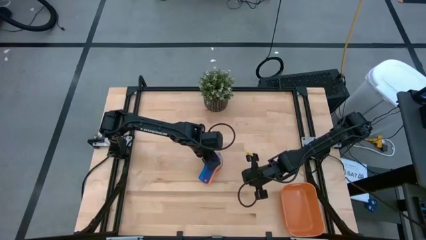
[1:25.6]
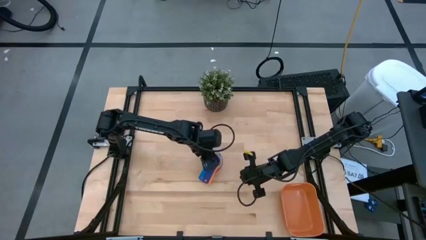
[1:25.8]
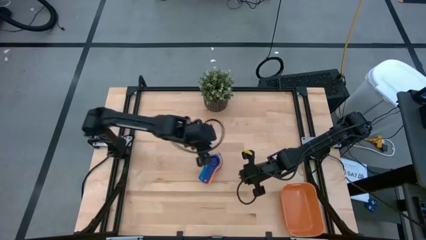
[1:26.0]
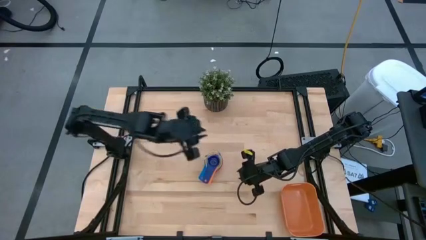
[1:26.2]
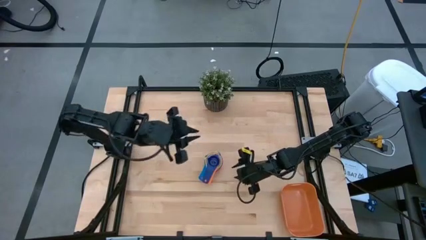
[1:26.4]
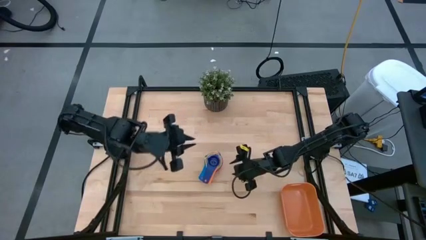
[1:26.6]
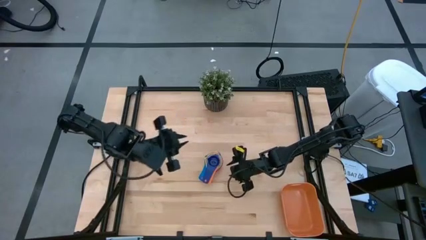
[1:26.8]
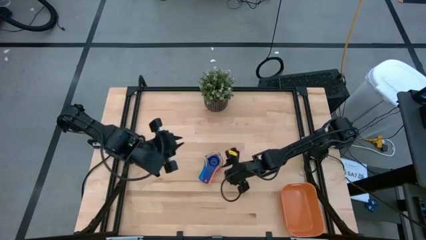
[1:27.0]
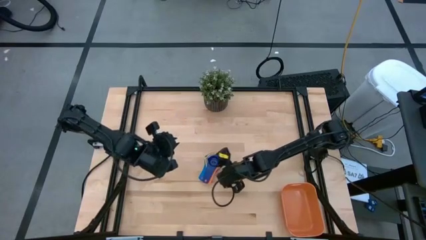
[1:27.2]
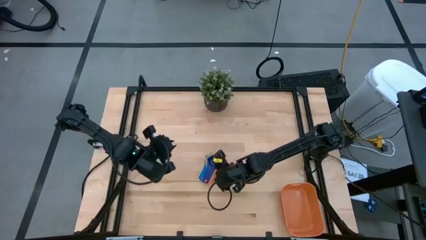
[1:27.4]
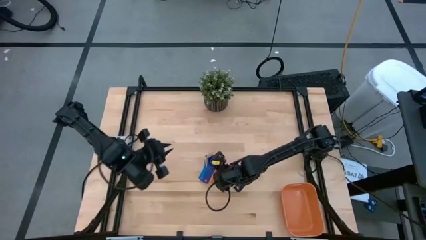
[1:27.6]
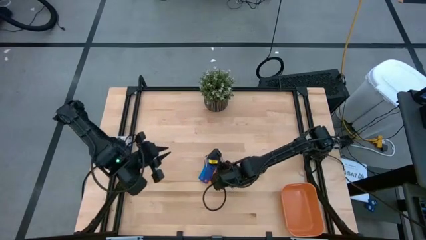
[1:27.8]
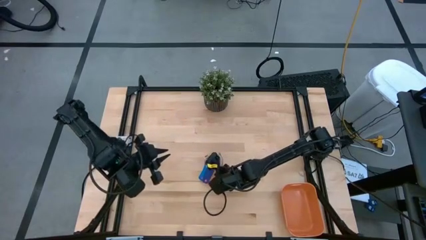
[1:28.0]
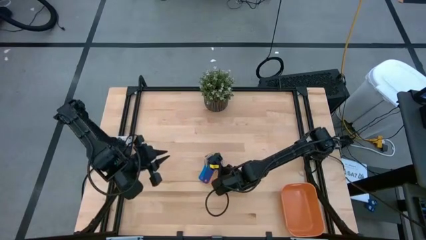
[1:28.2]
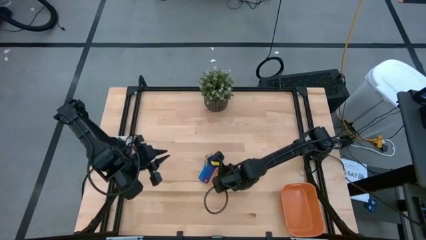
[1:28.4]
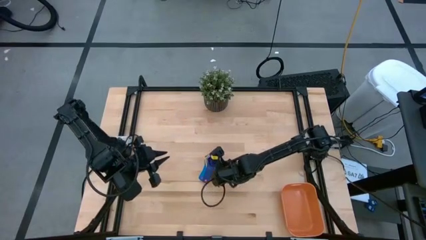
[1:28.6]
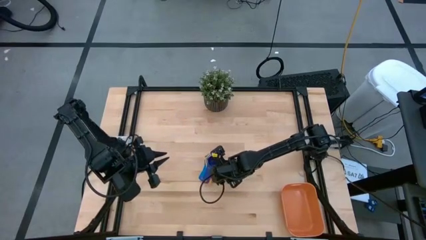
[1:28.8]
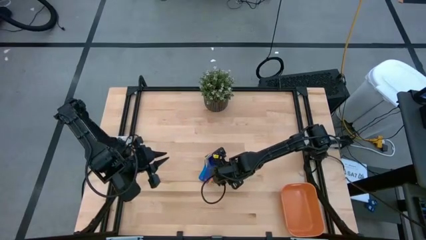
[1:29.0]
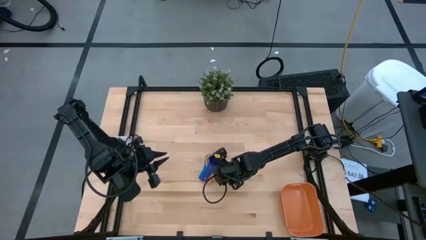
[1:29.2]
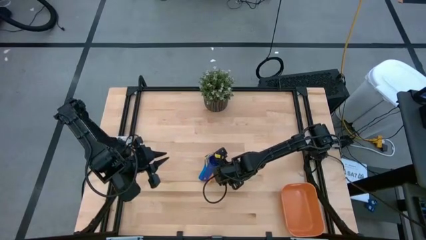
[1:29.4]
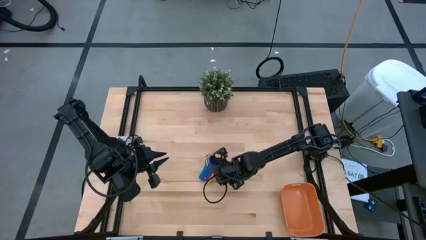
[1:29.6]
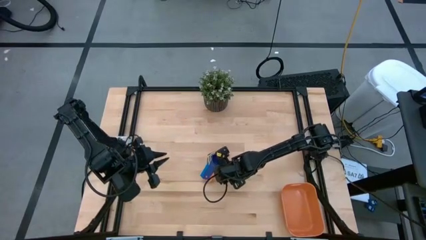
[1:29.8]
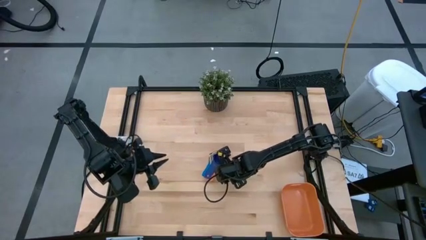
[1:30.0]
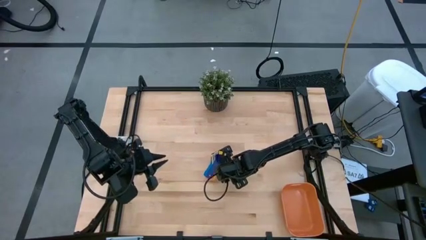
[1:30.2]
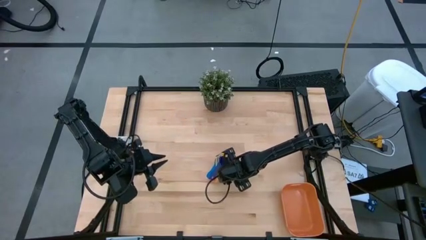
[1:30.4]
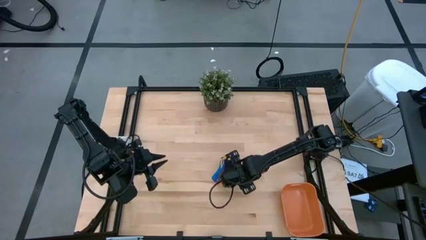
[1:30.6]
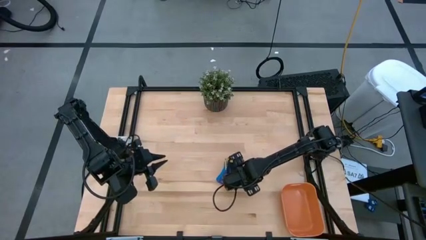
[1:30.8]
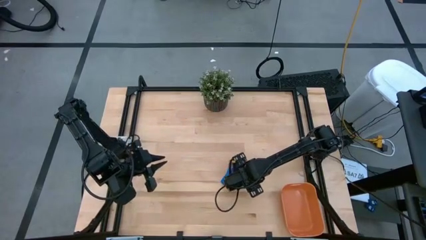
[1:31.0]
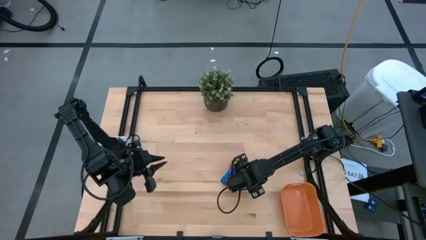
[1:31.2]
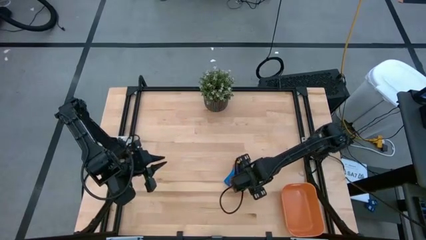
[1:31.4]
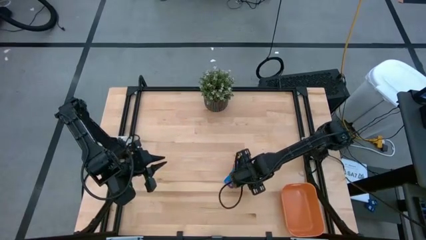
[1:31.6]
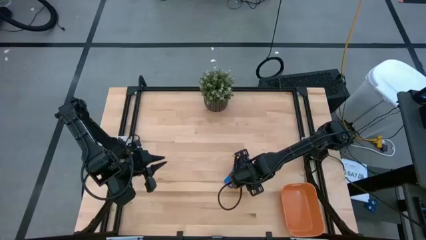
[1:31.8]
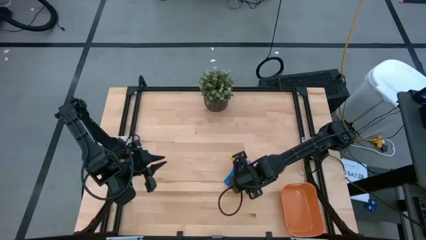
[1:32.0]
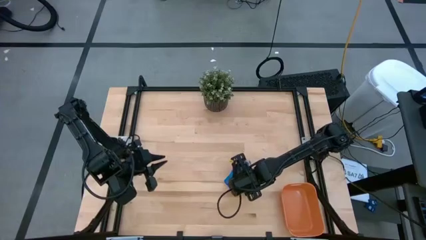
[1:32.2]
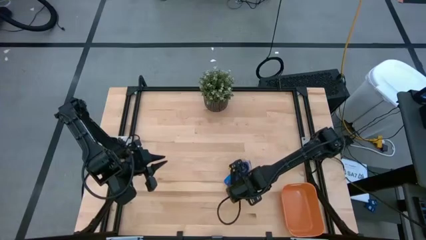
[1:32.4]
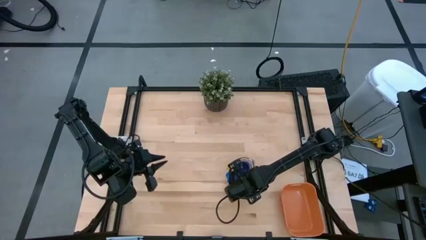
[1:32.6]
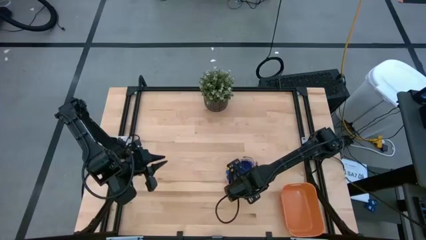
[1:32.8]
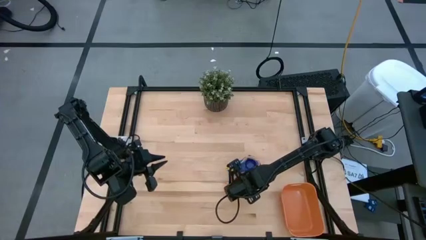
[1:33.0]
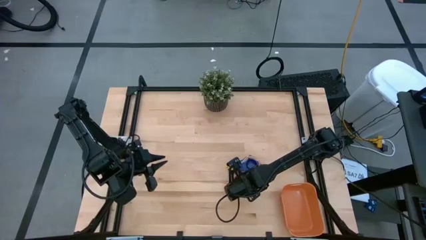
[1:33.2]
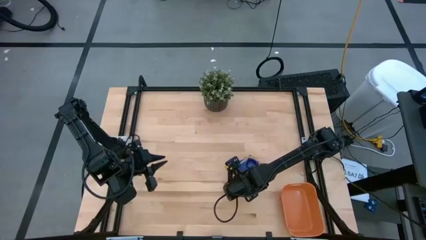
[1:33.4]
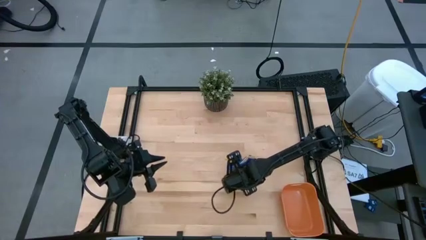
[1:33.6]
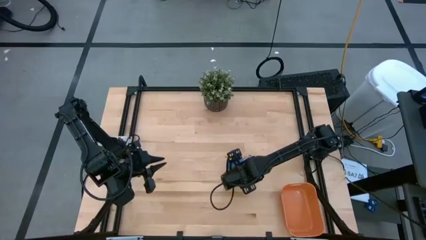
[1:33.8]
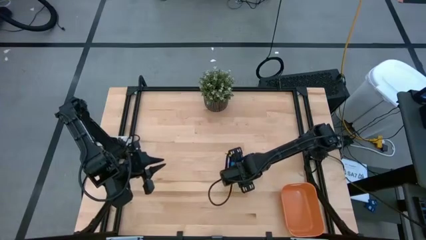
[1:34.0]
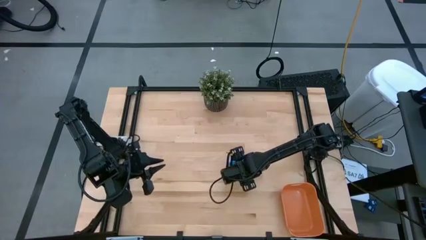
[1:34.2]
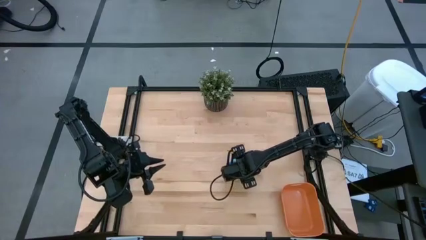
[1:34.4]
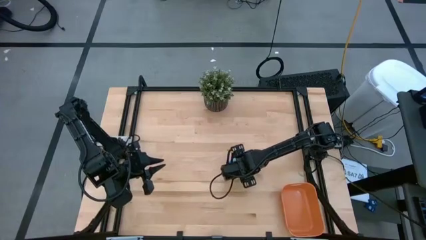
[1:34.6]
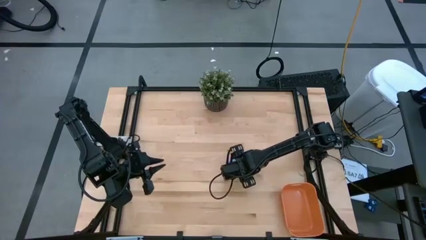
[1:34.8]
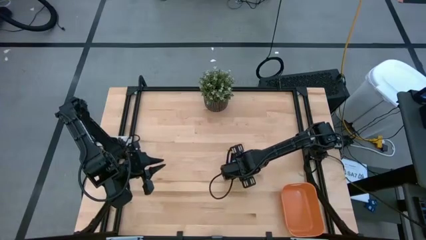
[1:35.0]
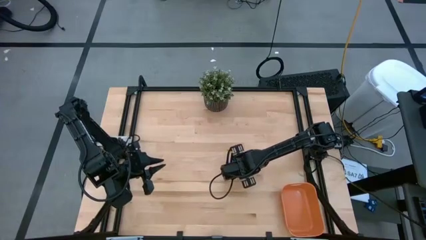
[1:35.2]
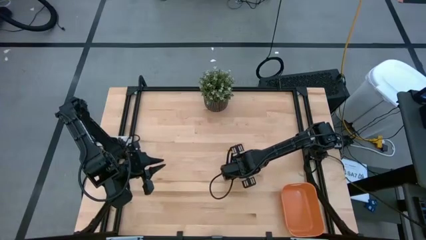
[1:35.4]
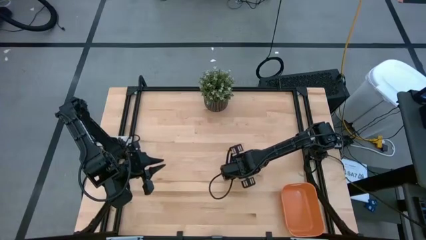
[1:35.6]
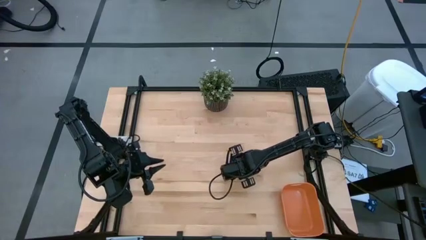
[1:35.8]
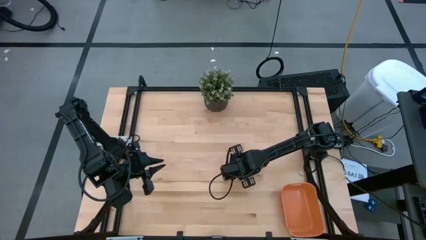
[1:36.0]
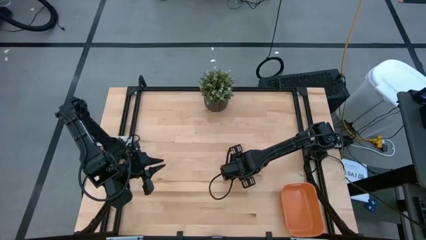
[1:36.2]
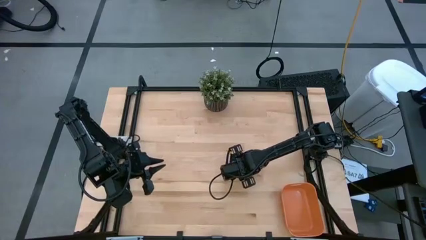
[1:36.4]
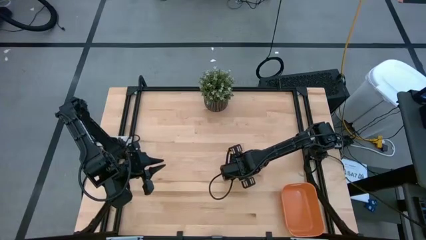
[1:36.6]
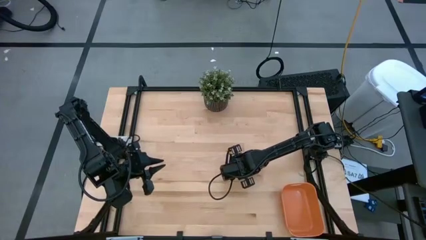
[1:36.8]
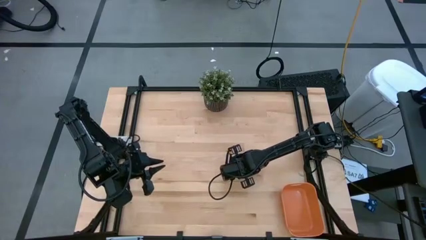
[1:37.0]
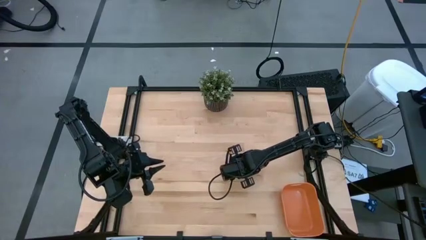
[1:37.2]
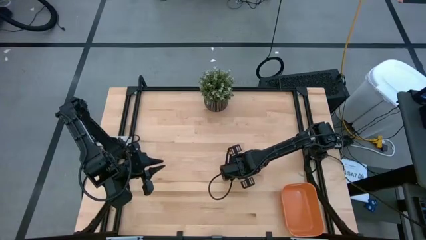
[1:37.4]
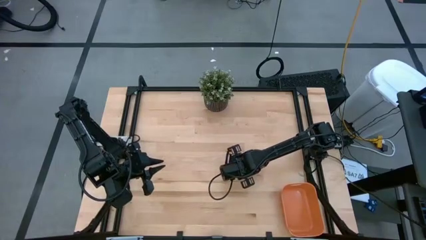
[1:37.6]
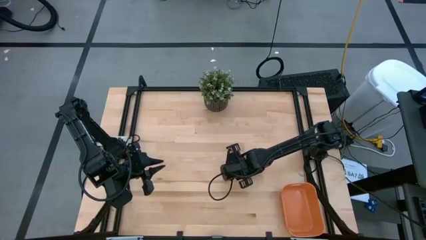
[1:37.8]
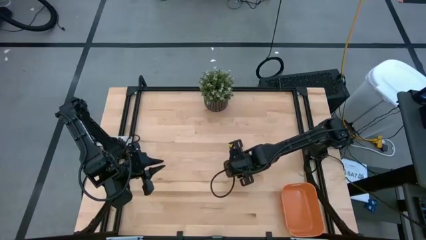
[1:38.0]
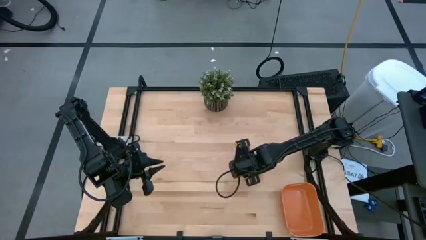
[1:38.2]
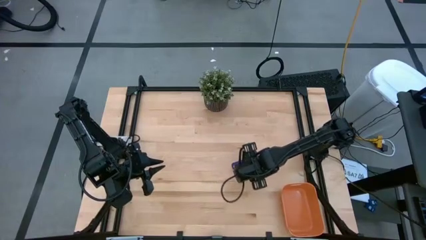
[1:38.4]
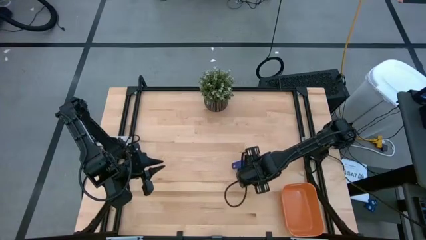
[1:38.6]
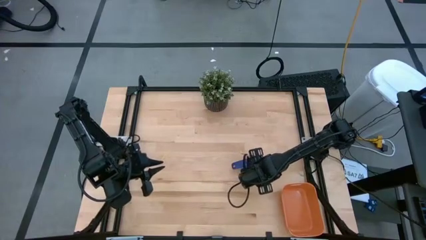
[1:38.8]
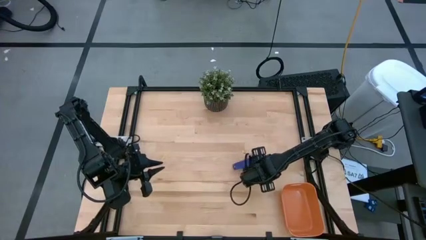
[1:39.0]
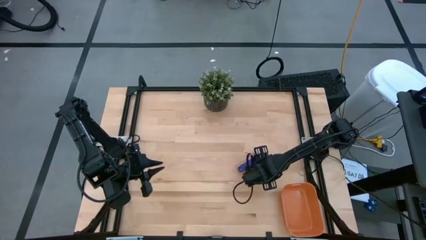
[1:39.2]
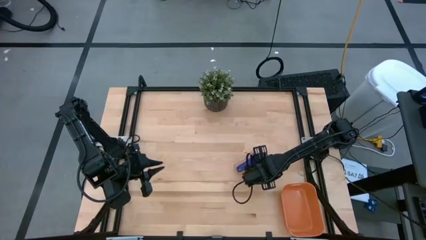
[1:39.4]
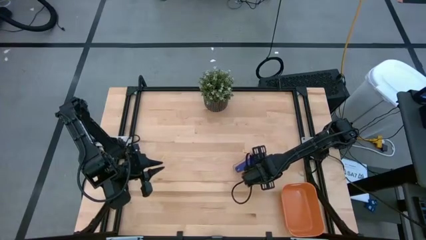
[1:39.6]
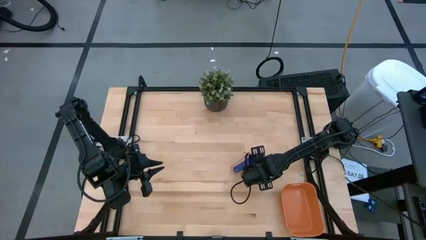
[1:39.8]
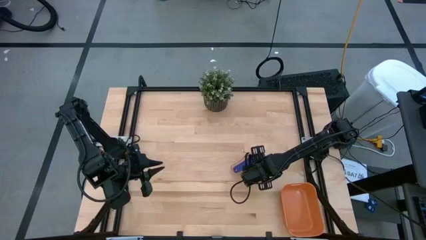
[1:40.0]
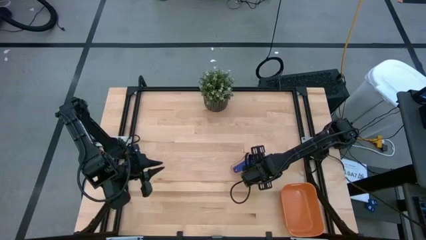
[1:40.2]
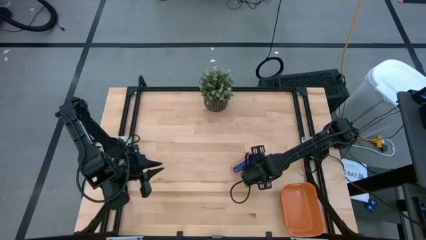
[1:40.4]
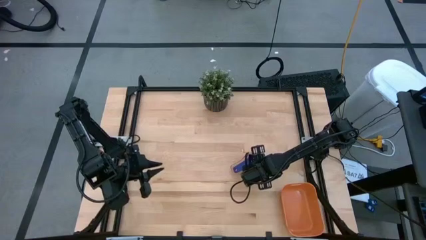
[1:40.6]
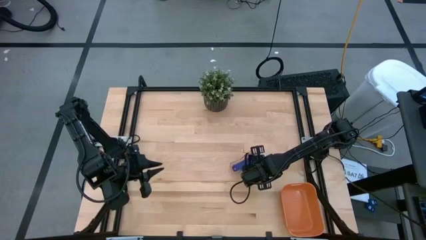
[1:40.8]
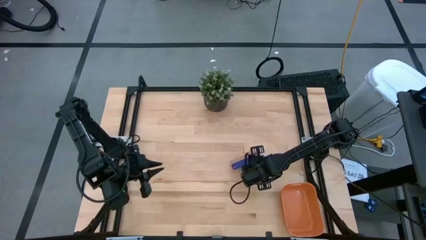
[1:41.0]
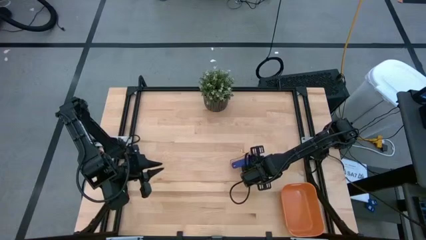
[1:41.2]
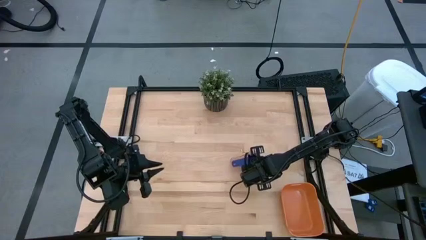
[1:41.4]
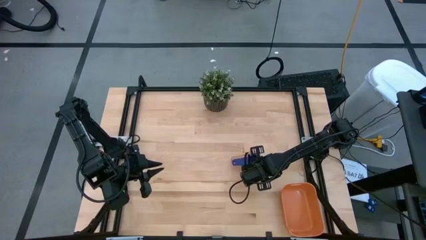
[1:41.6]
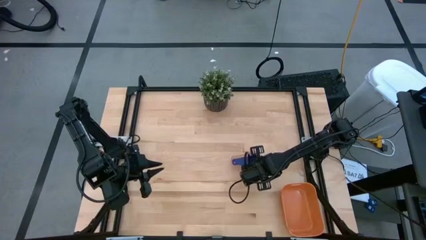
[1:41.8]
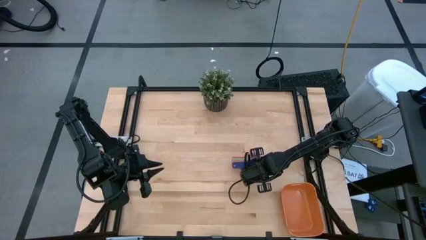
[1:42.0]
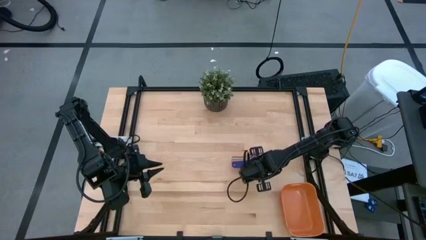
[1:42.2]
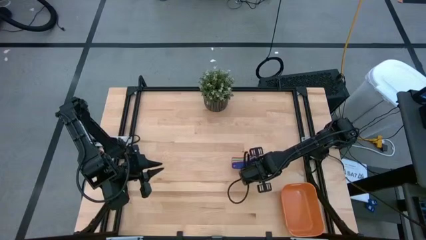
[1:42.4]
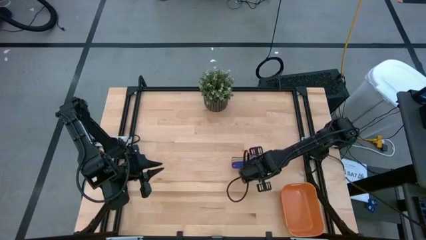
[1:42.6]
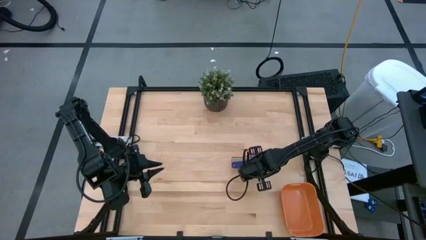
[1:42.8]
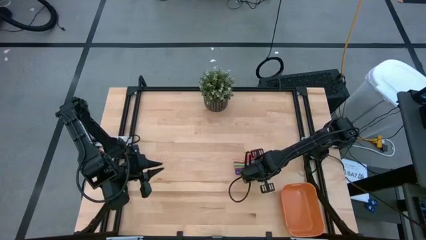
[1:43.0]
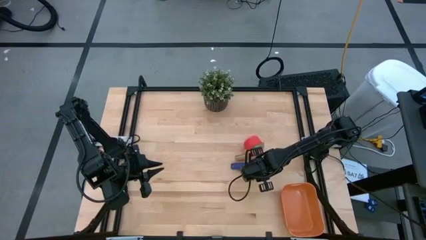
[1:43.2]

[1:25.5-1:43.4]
Task: Nest measuring cups in basket
Put the nested measuring cups into the orange bin
